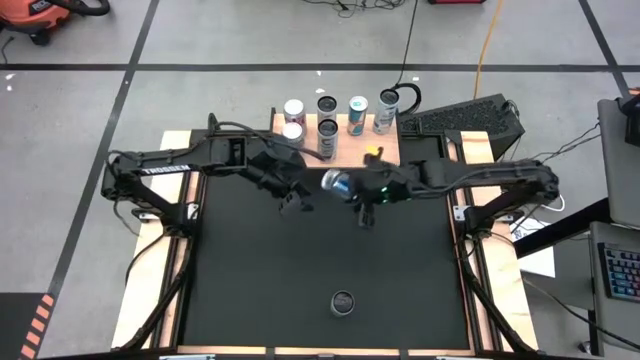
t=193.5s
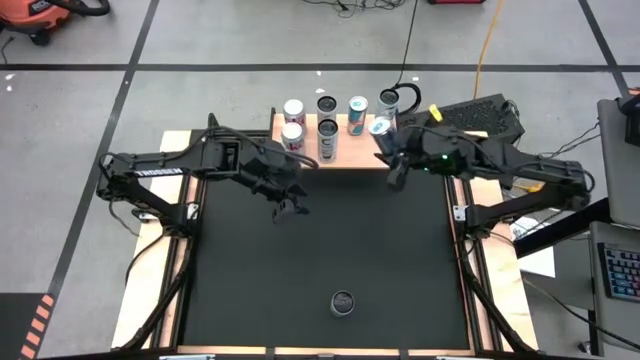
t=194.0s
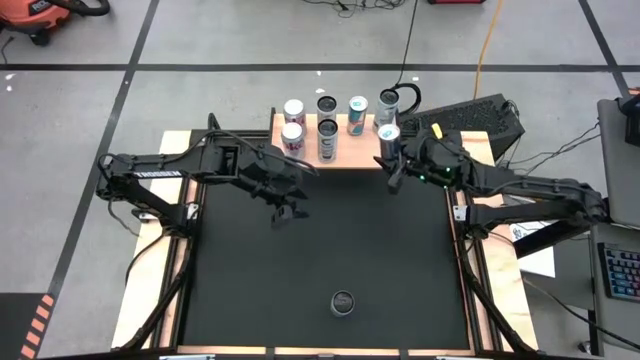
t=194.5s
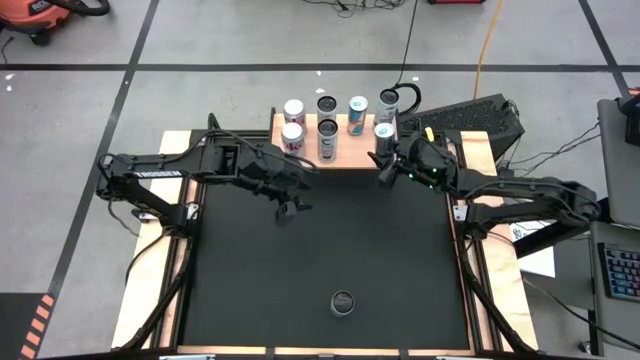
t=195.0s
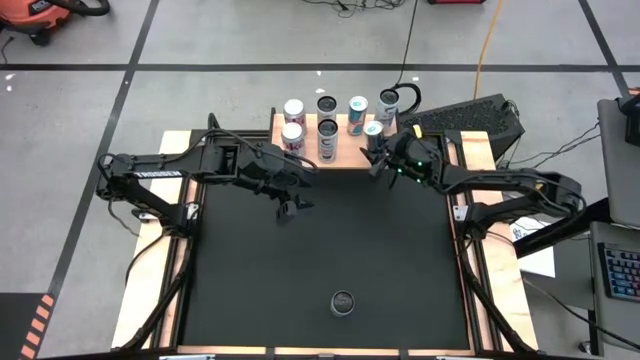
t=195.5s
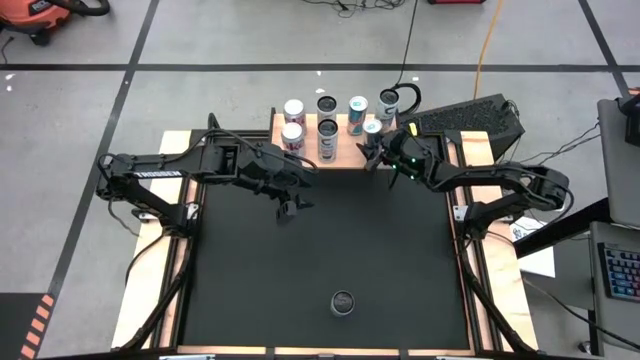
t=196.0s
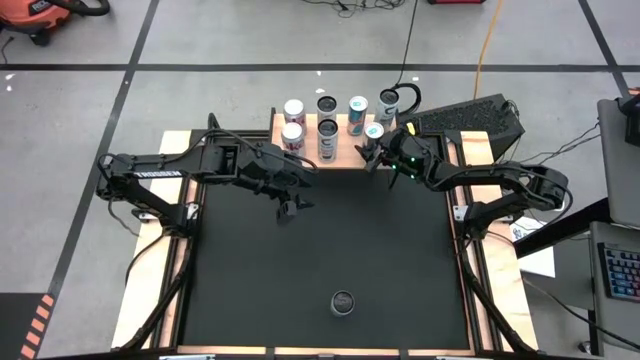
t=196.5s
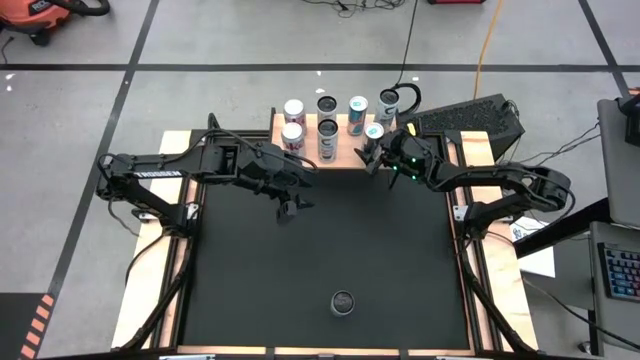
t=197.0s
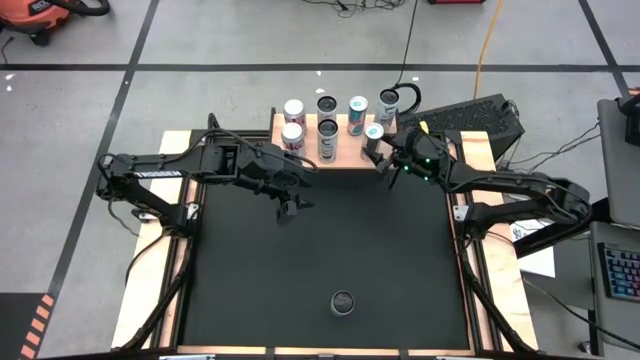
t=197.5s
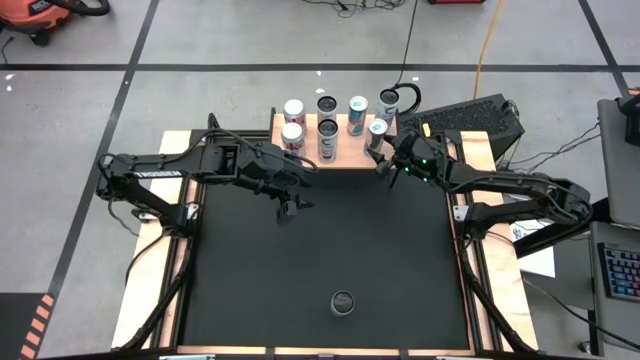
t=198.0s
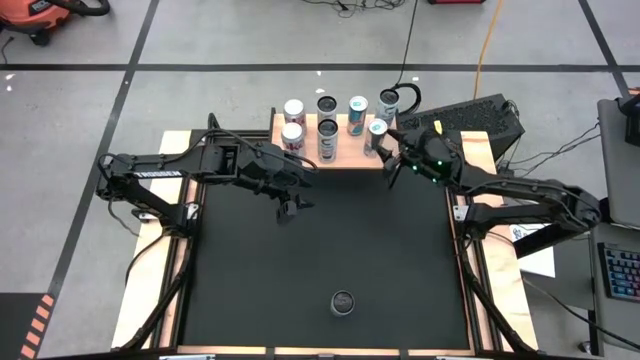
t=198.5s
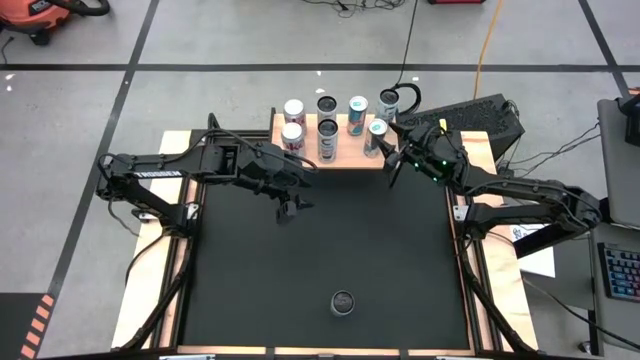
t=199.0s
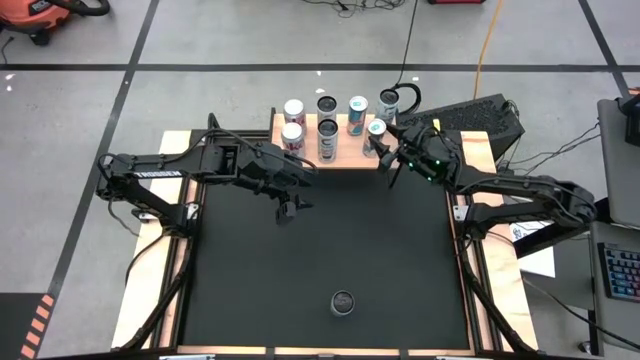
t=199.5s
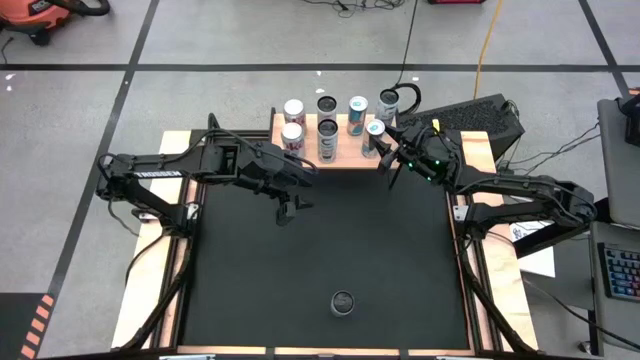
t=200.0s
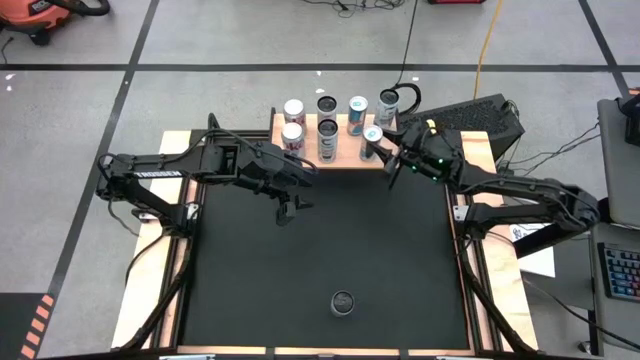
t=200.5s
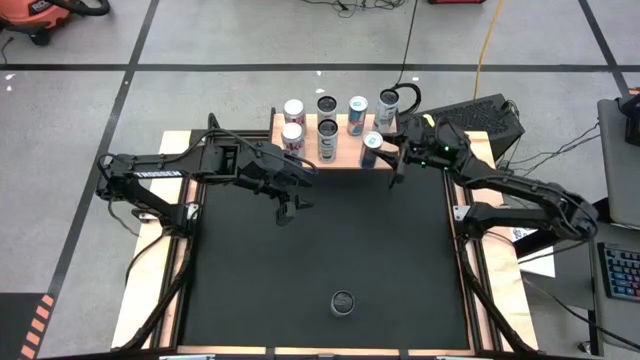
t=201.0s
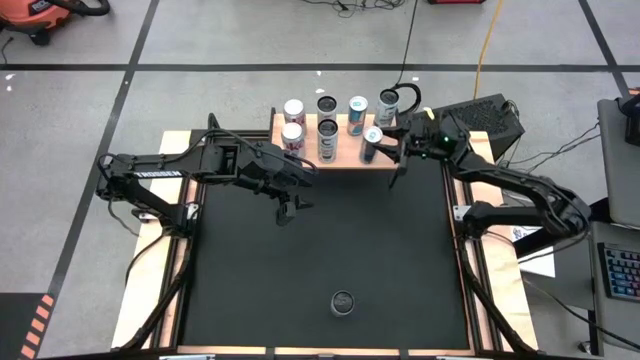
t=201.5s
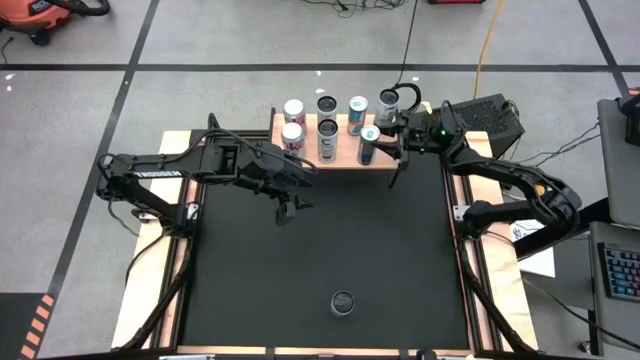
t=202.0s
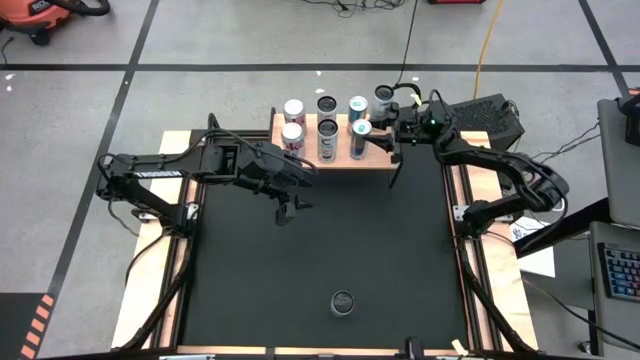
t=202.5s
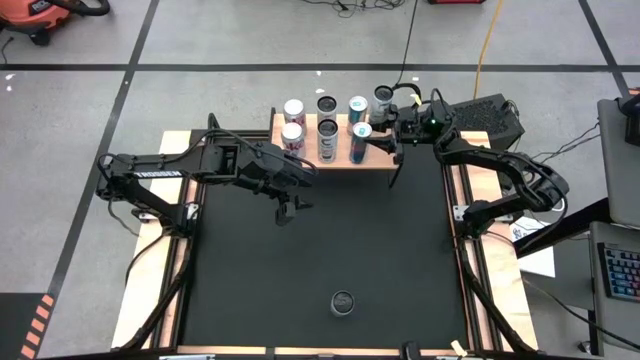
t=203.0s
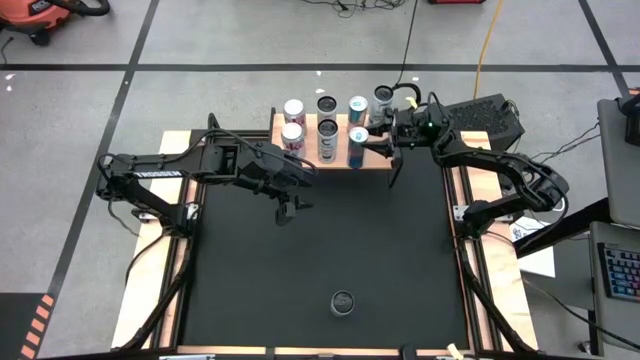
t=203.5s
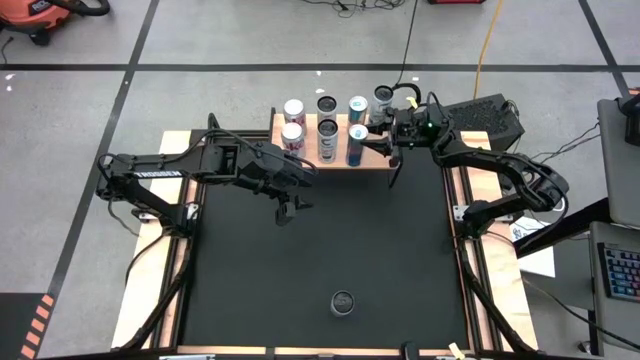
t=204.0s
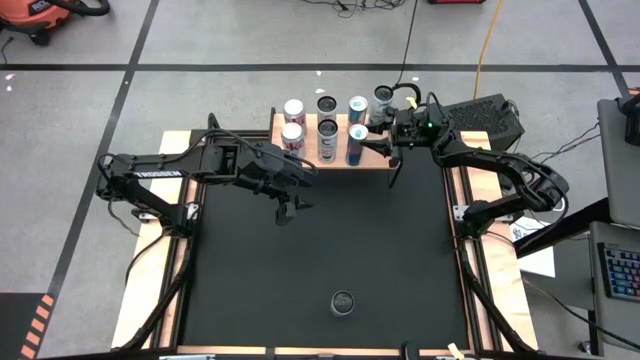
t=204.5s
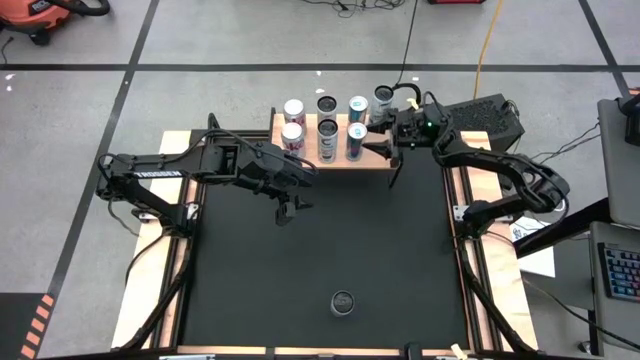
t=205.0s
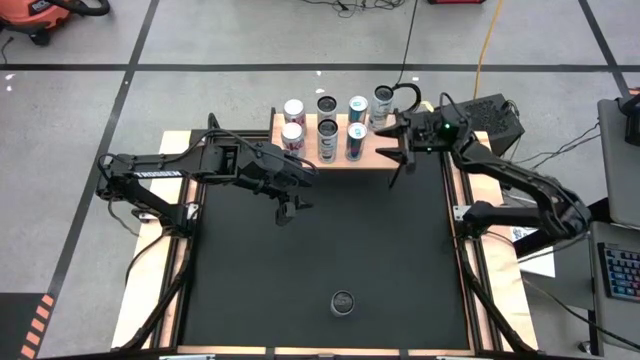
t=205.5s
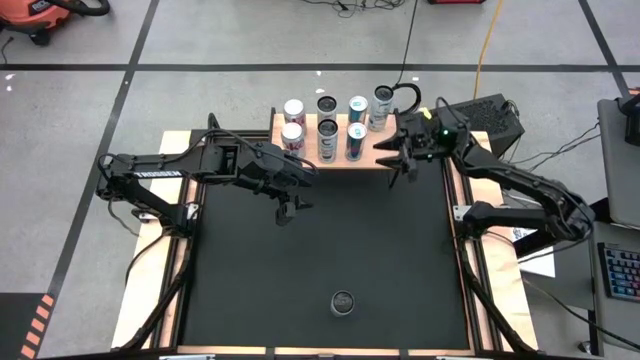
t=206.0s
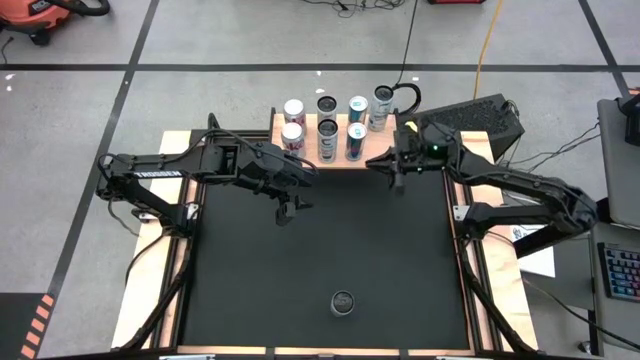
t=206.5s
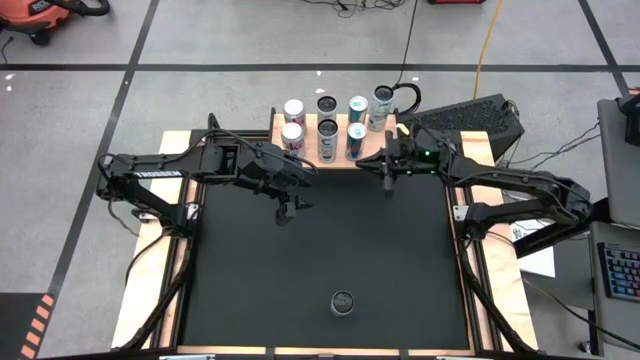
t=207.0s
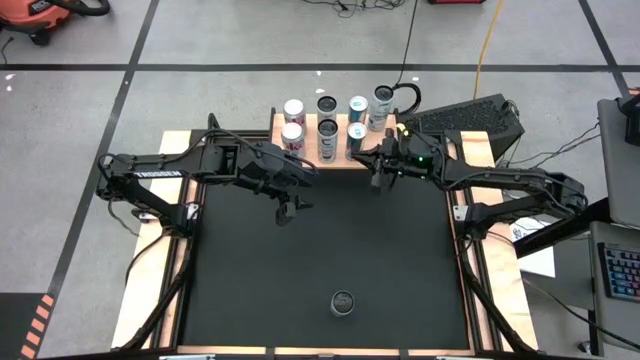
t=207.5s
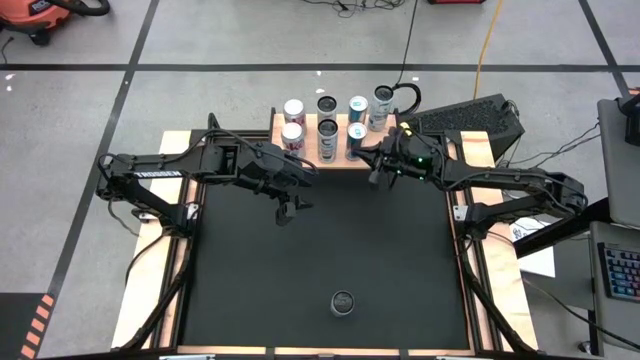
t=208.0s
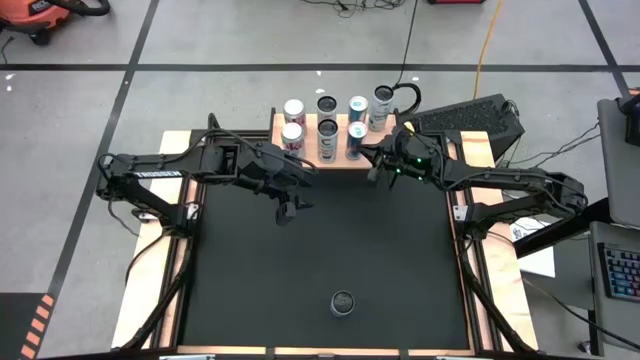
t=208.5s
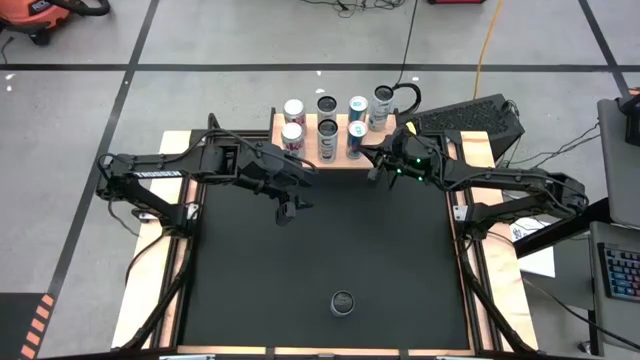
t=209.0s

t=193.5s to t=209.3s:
Task: Place canned beverage on shelf
Put the blue soda can aligned with the other blue soda can on the shelf
